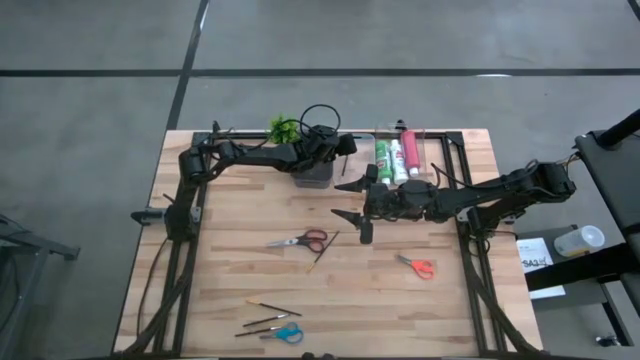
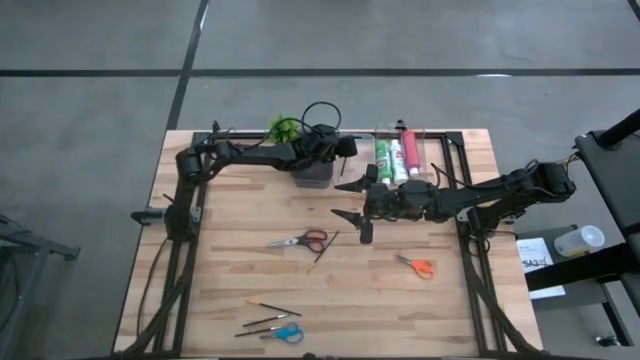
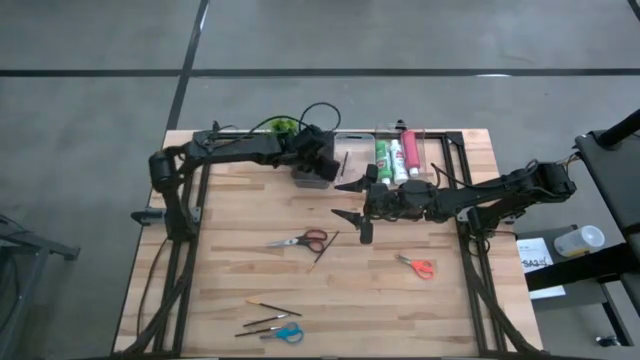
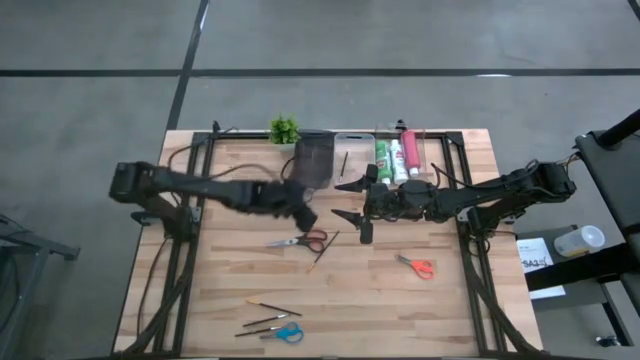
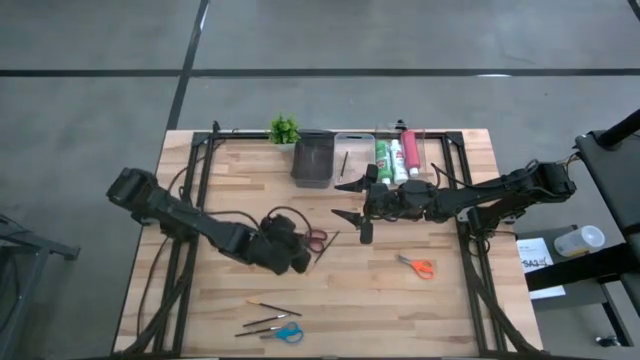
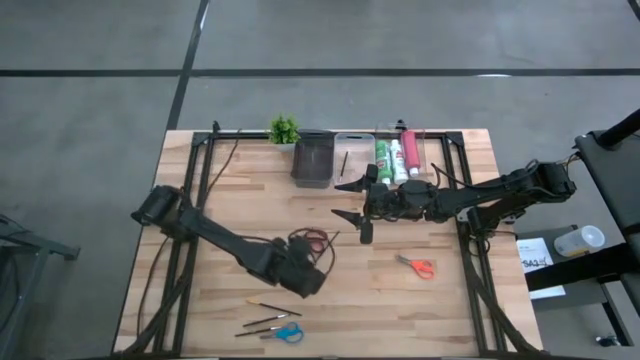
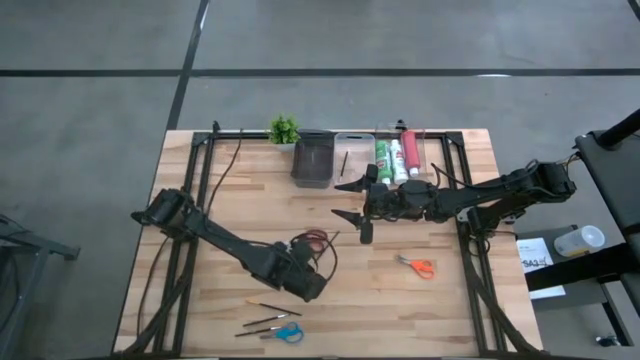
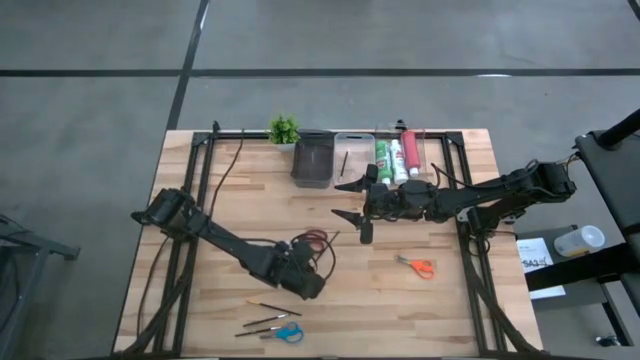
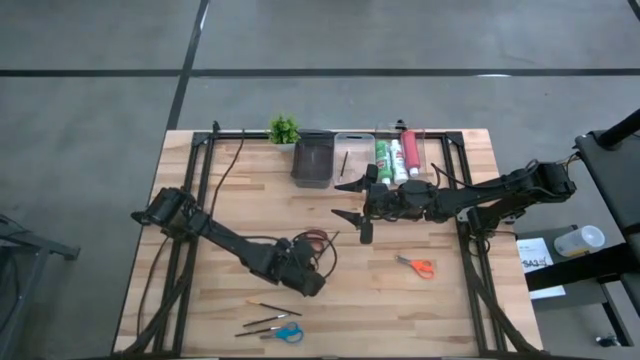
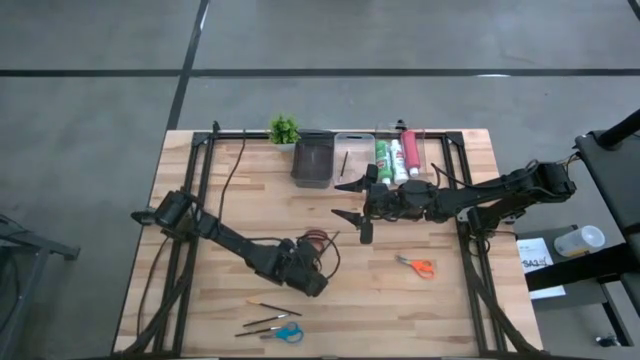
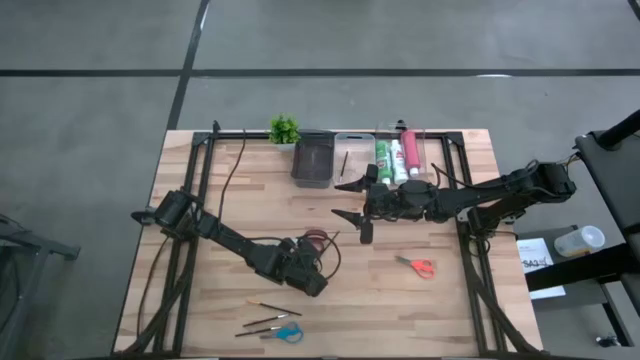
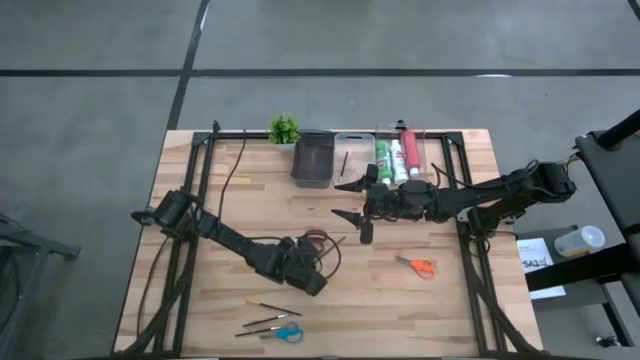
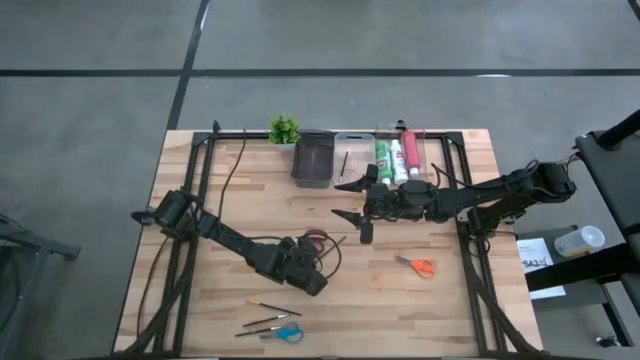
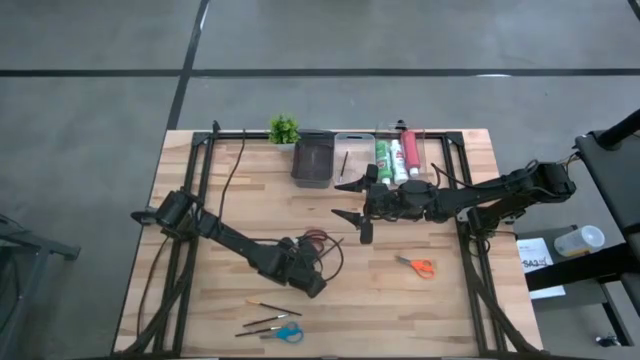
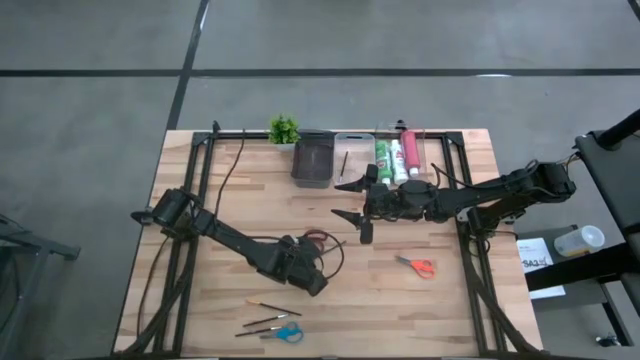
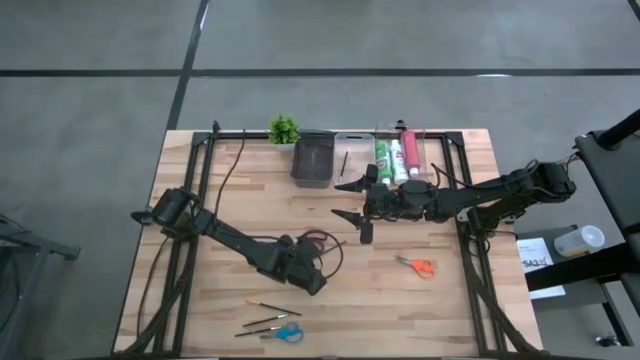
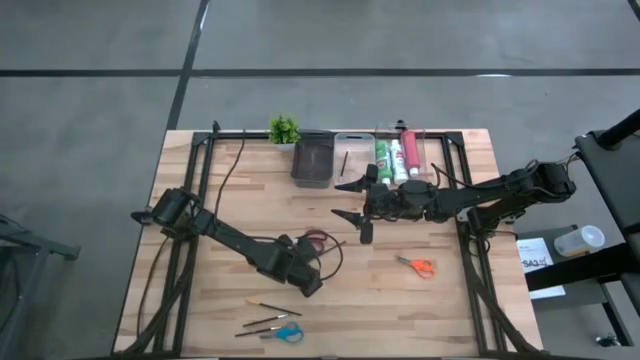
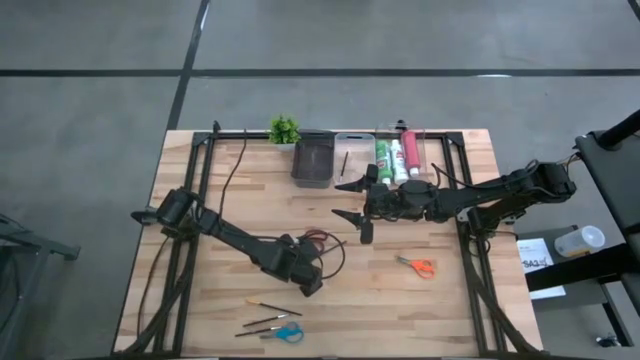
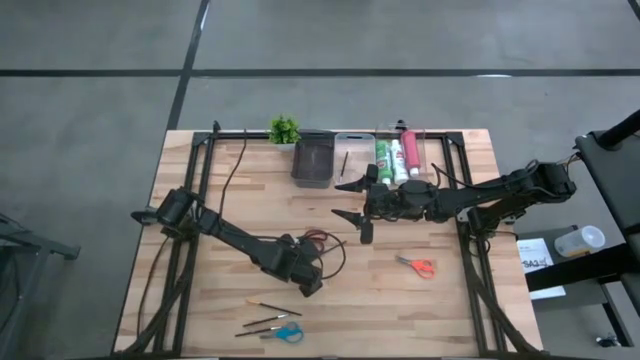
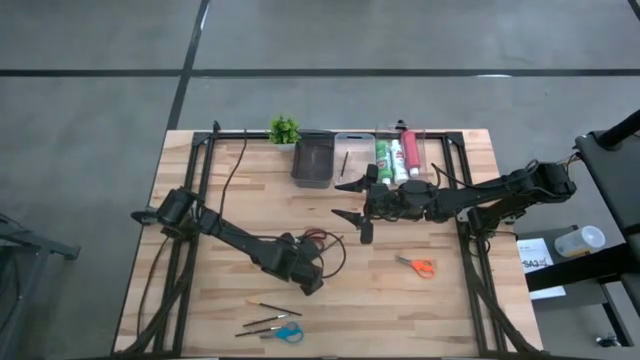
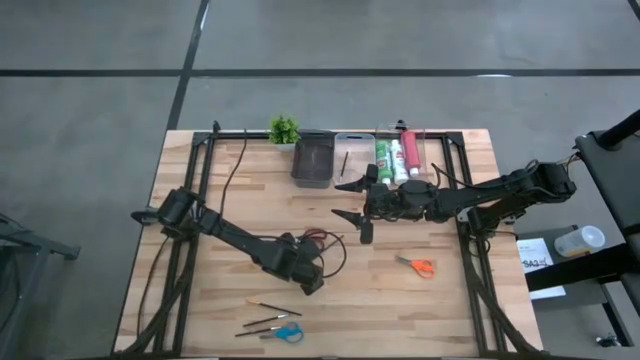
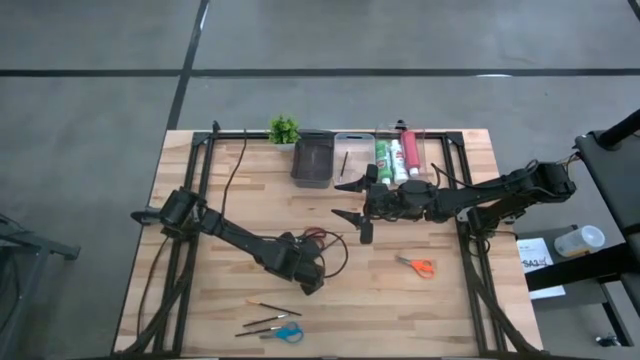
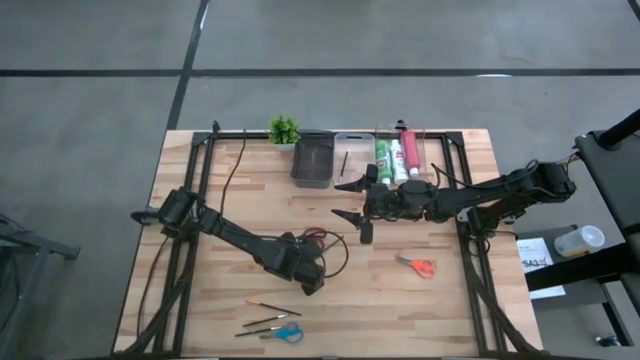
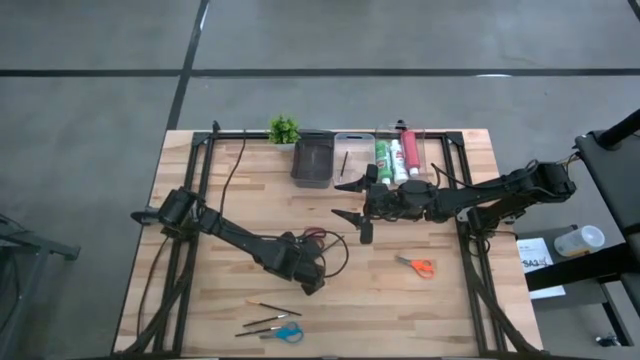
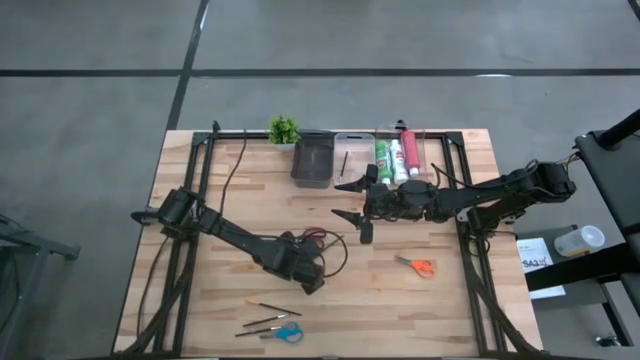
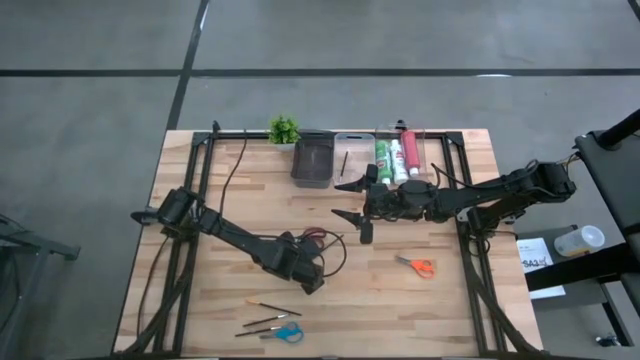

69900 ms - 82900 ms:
Task: Pick & Place Paint Supplies
Put the top gold paint brush into the white transparent bin

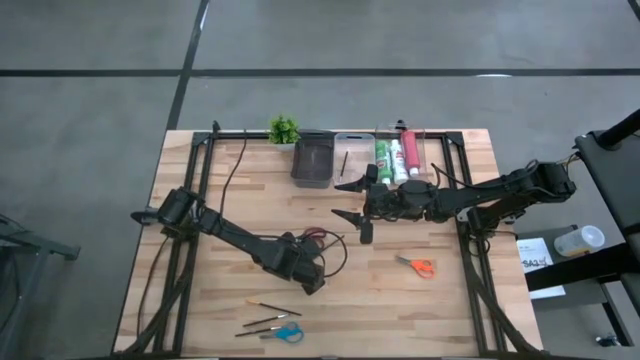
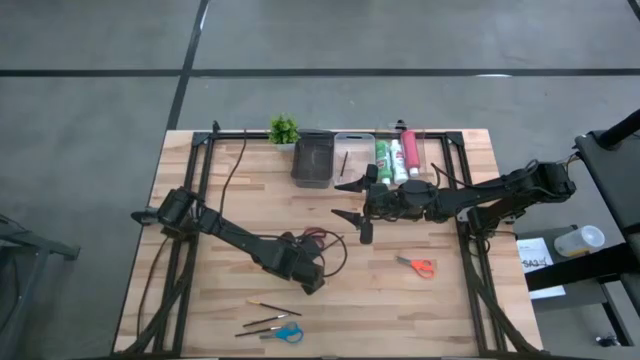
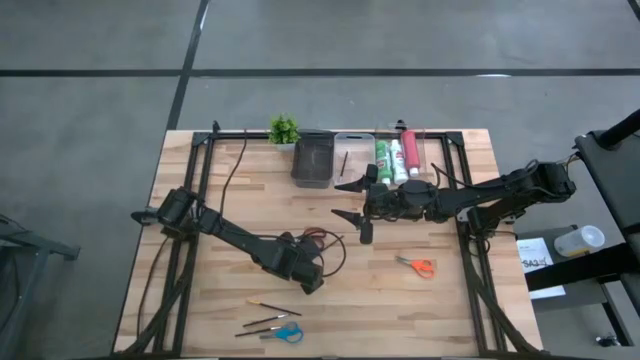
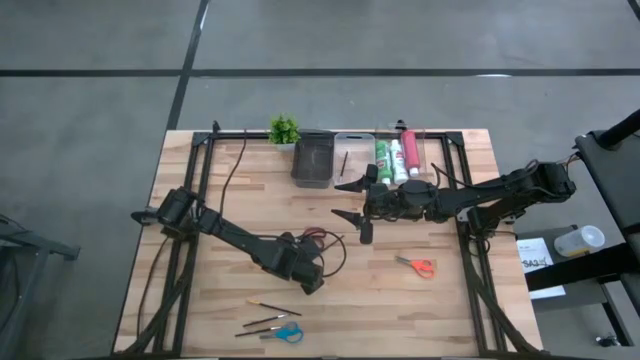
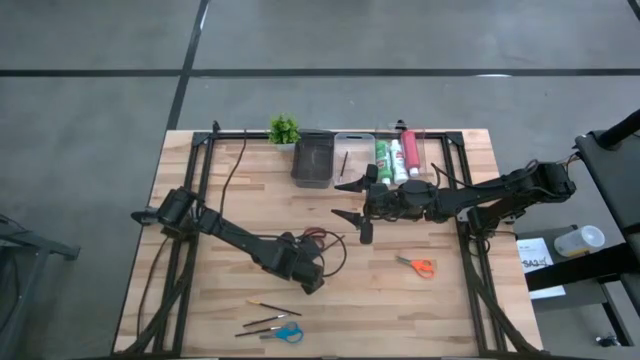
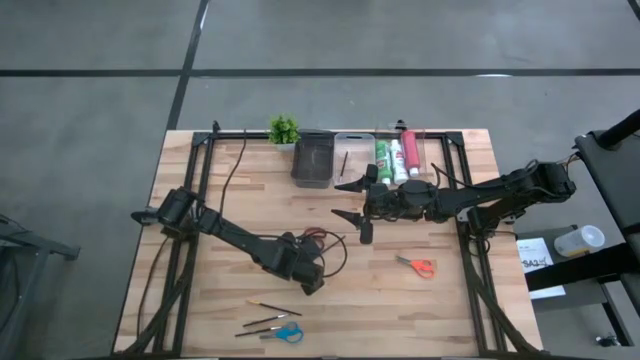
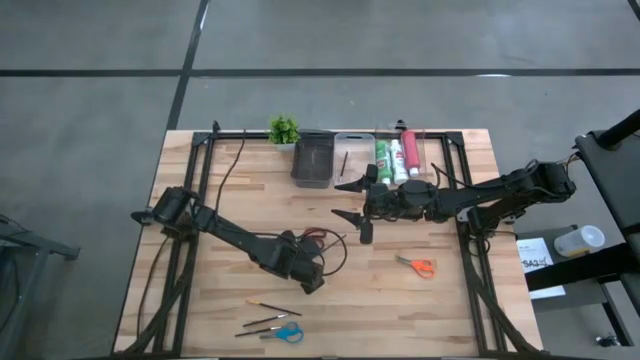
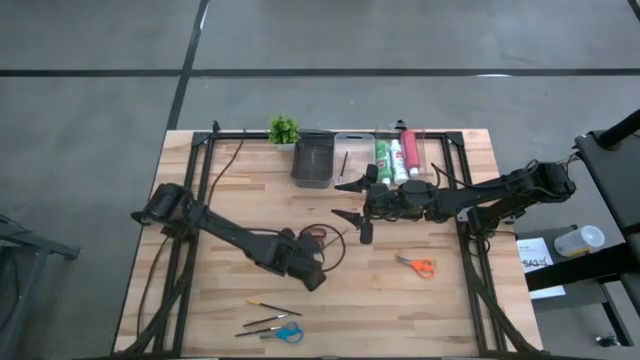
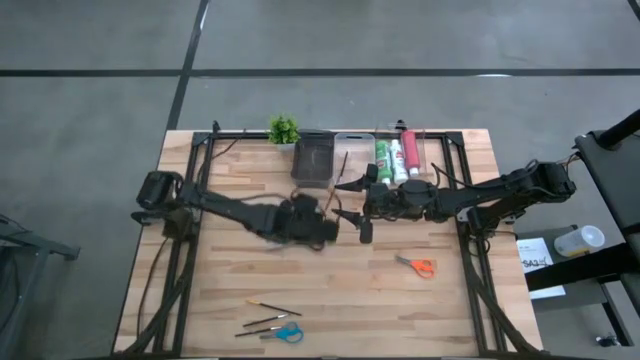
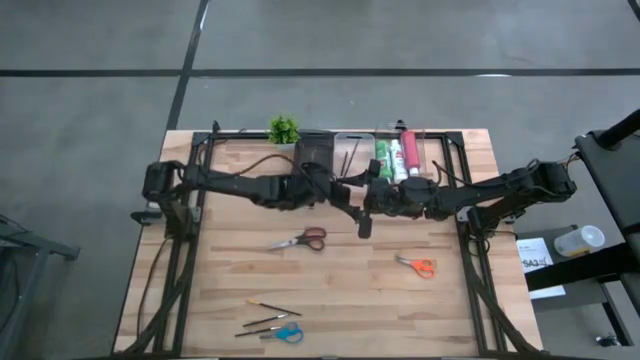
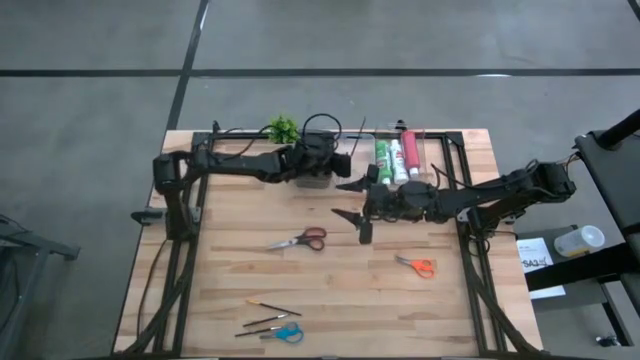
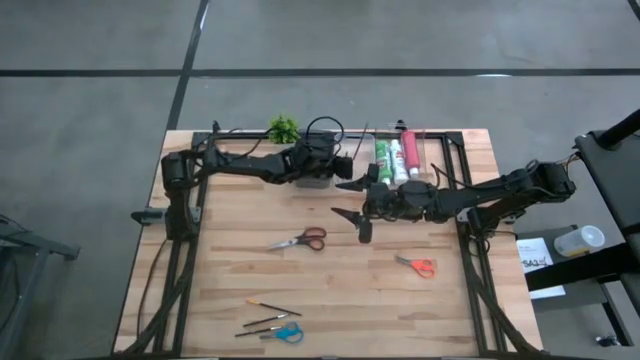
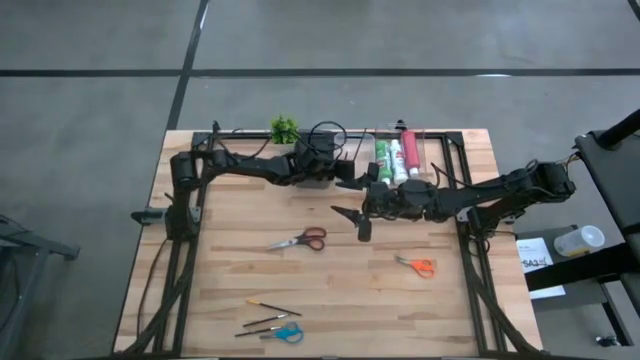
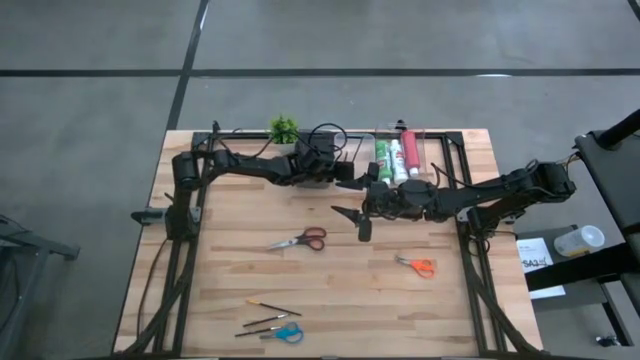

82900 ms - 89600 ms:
Put the top gold paint brush into the white transparent bin

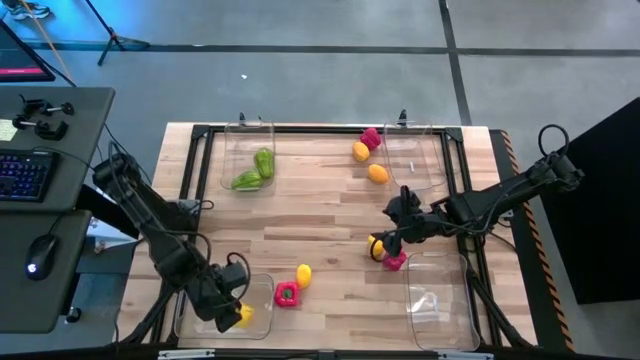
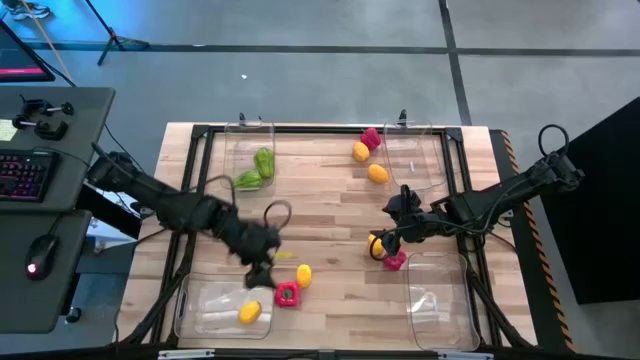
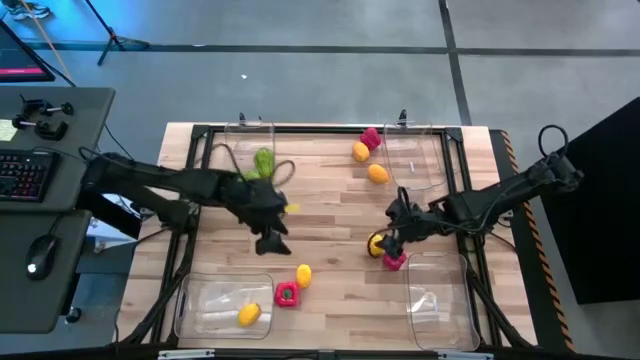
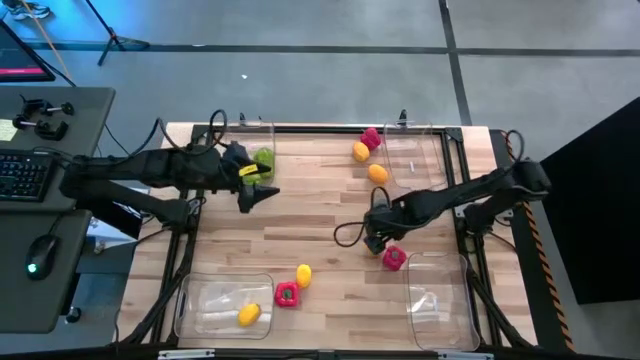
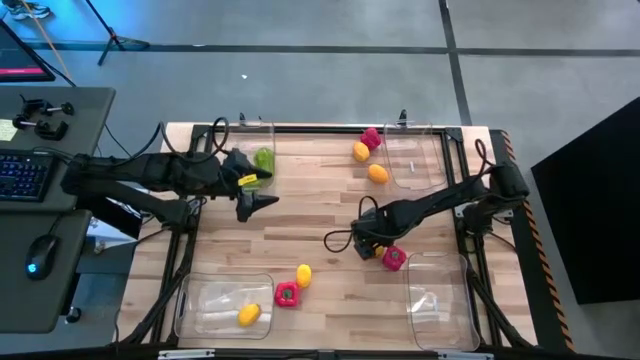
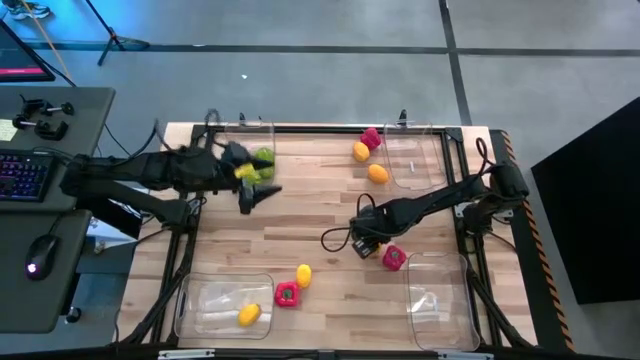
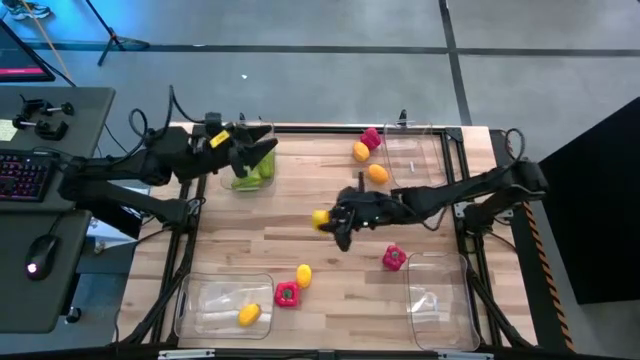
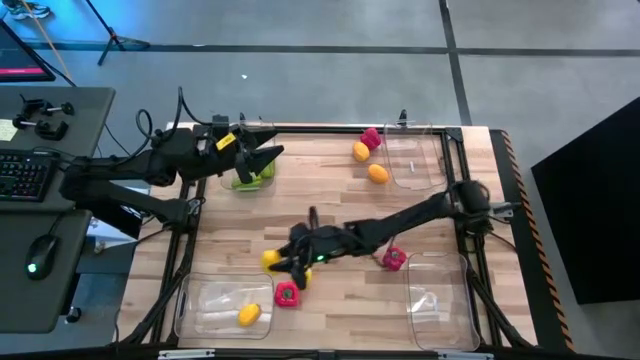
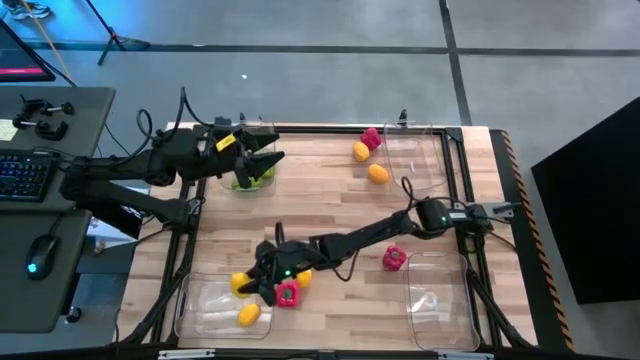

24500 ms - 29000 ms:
Task: Sort produce into baskets
Put the lemon into the bottom left transparent bin
